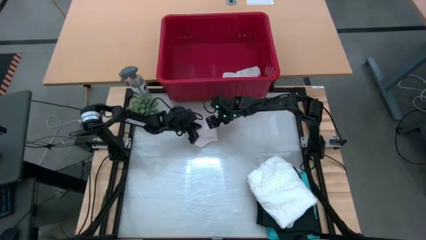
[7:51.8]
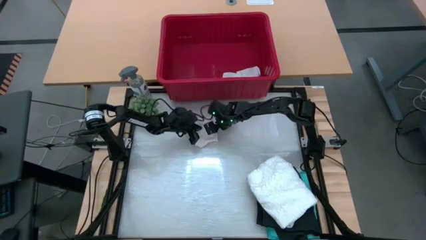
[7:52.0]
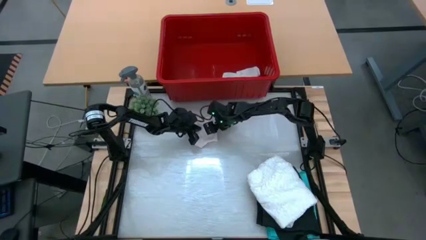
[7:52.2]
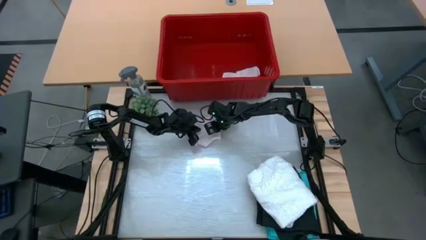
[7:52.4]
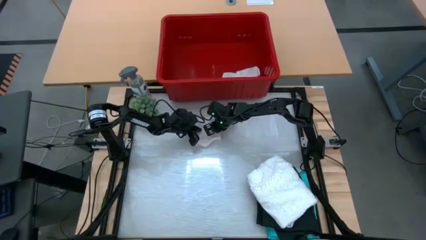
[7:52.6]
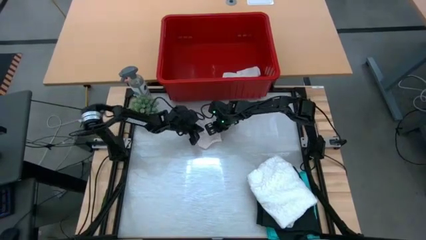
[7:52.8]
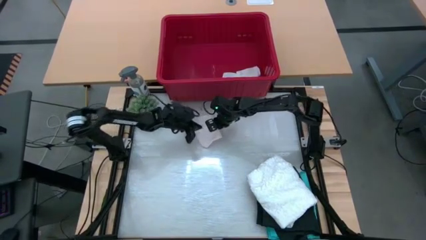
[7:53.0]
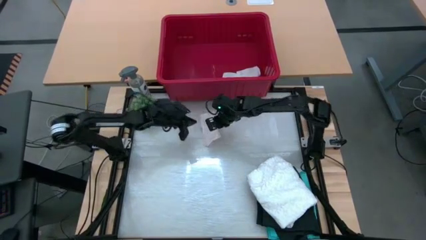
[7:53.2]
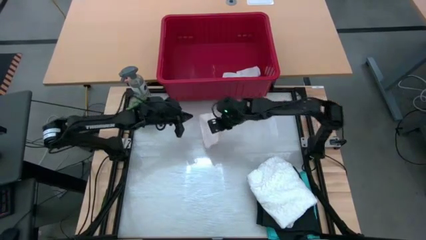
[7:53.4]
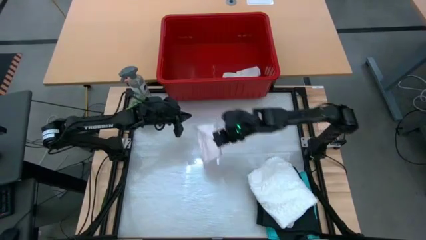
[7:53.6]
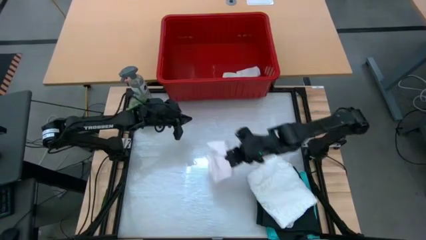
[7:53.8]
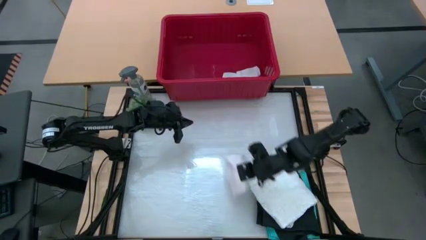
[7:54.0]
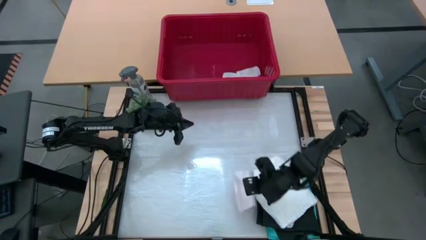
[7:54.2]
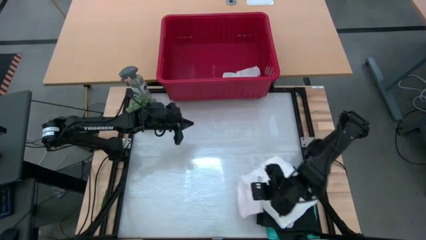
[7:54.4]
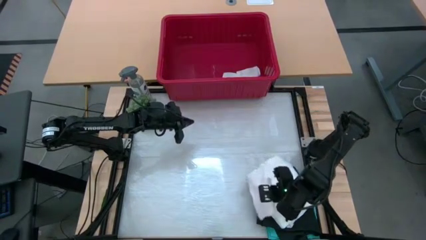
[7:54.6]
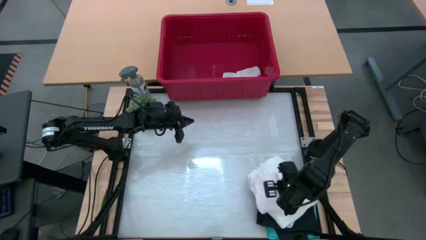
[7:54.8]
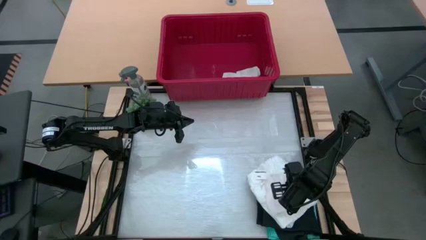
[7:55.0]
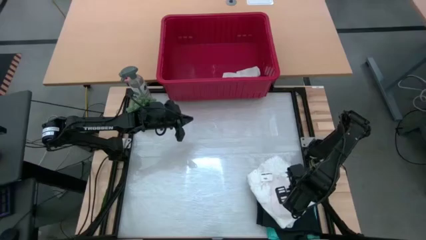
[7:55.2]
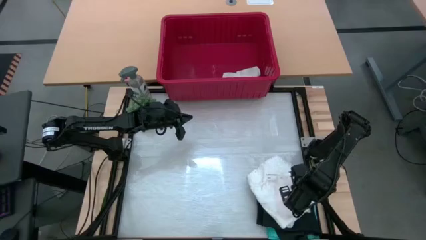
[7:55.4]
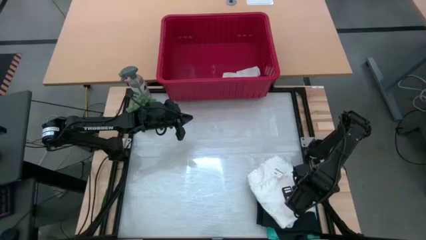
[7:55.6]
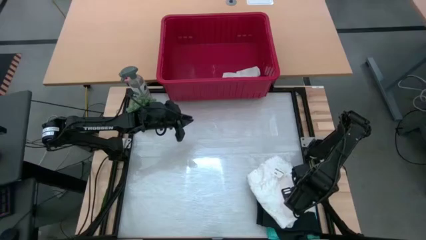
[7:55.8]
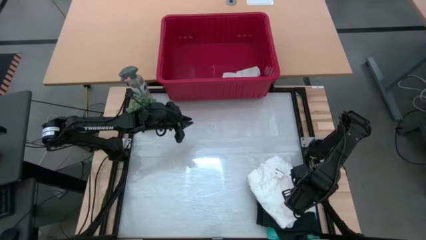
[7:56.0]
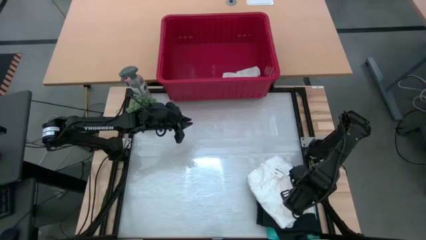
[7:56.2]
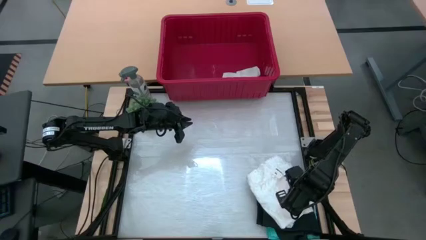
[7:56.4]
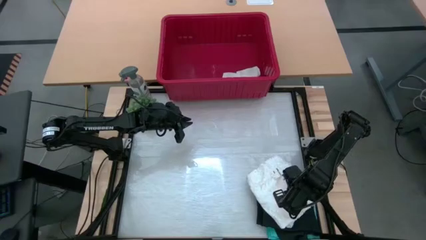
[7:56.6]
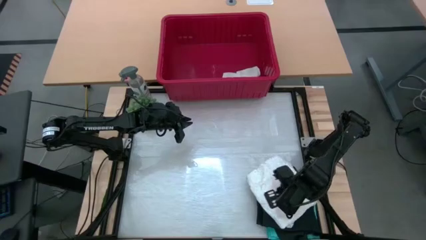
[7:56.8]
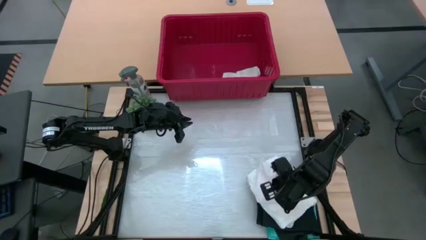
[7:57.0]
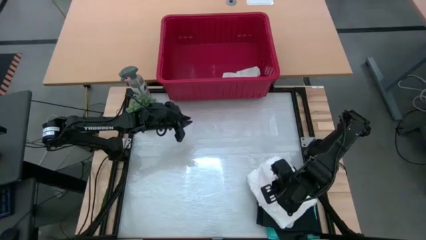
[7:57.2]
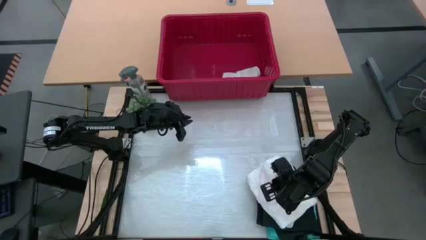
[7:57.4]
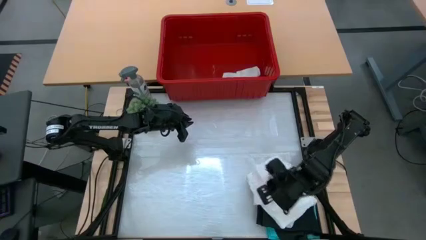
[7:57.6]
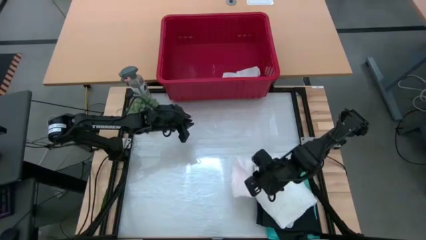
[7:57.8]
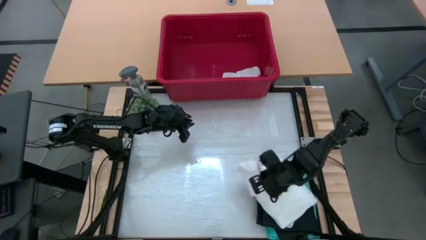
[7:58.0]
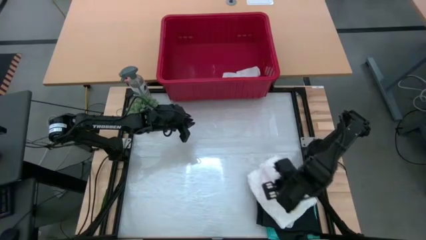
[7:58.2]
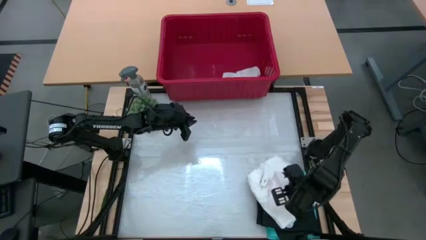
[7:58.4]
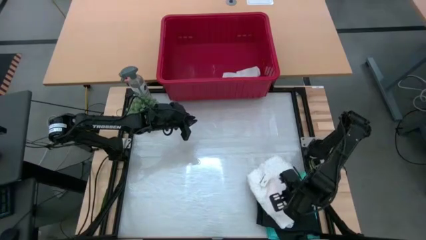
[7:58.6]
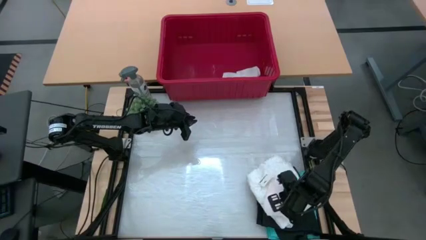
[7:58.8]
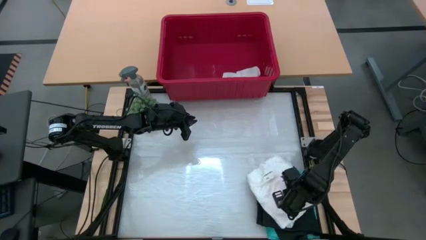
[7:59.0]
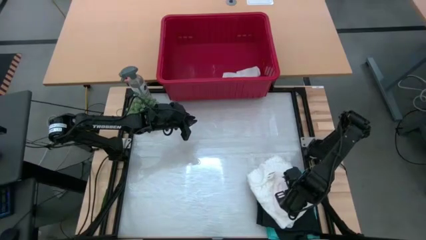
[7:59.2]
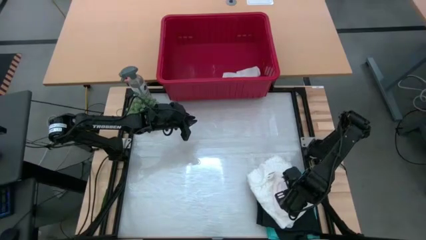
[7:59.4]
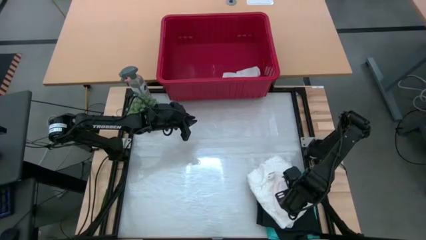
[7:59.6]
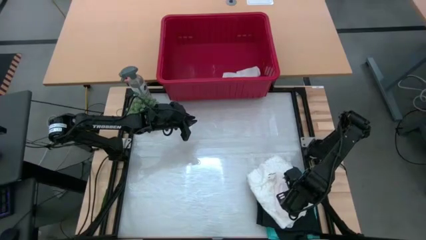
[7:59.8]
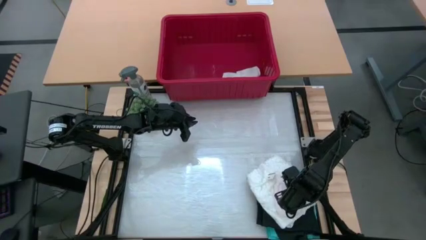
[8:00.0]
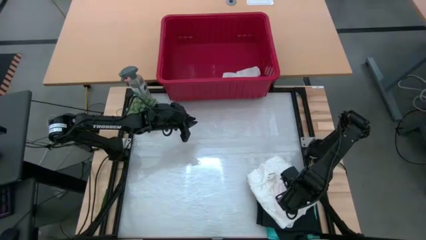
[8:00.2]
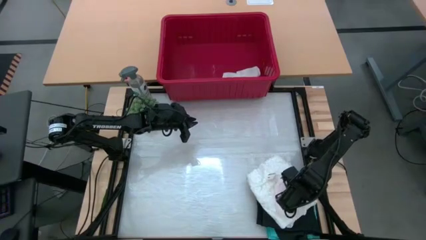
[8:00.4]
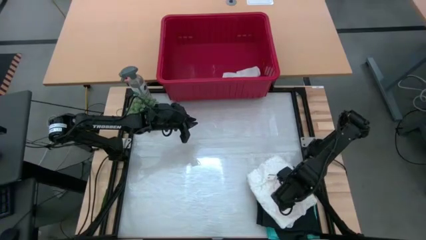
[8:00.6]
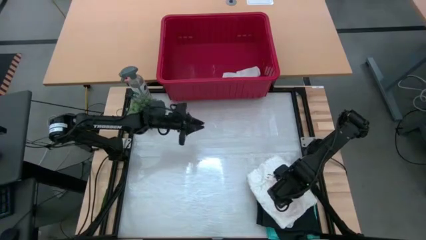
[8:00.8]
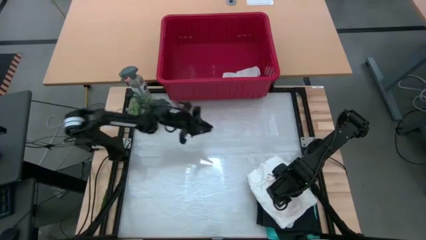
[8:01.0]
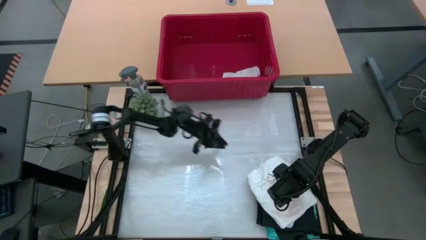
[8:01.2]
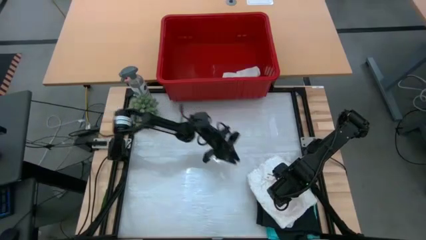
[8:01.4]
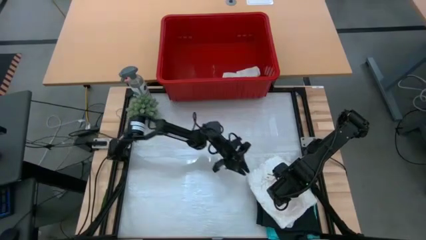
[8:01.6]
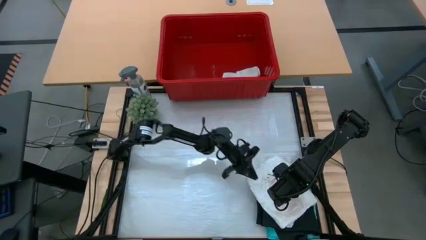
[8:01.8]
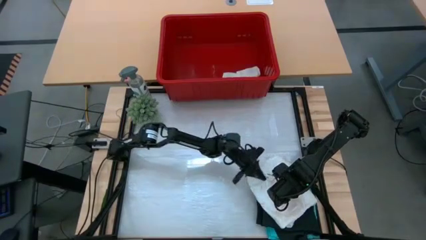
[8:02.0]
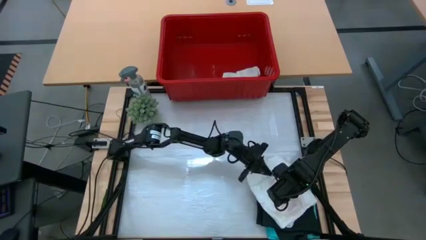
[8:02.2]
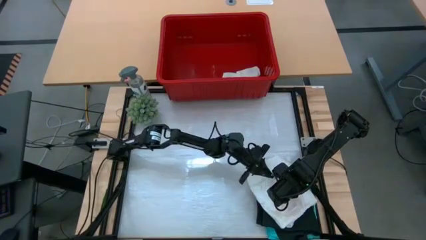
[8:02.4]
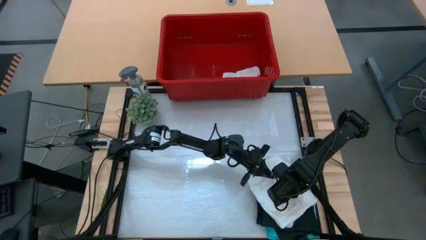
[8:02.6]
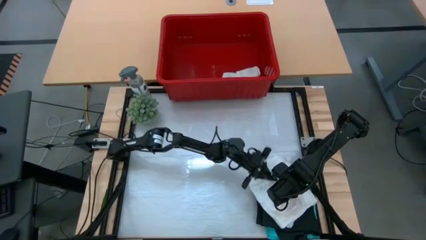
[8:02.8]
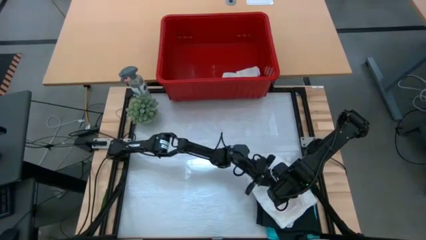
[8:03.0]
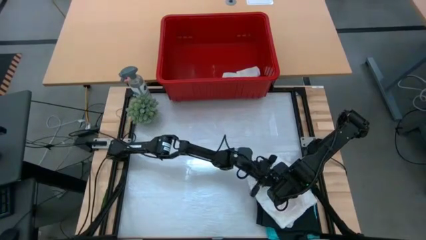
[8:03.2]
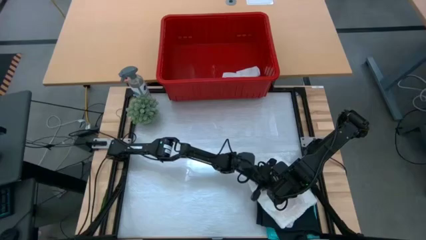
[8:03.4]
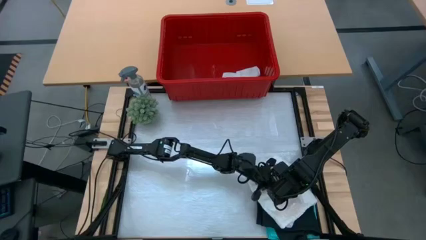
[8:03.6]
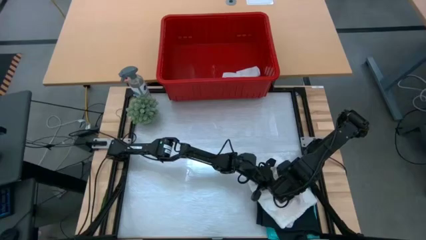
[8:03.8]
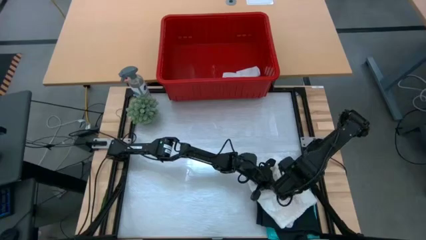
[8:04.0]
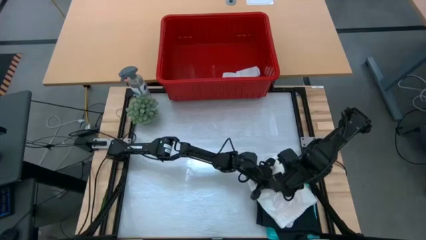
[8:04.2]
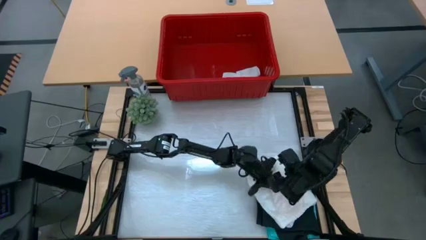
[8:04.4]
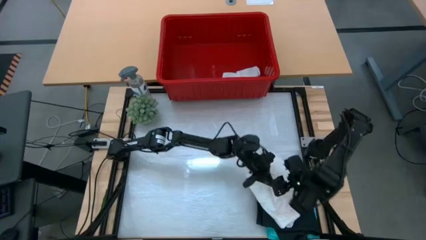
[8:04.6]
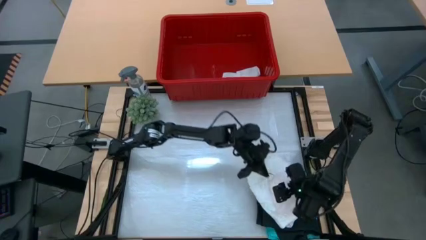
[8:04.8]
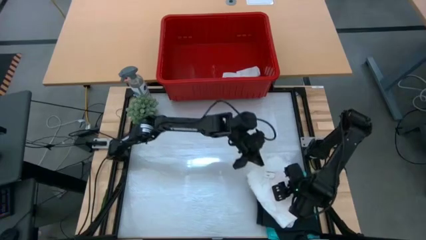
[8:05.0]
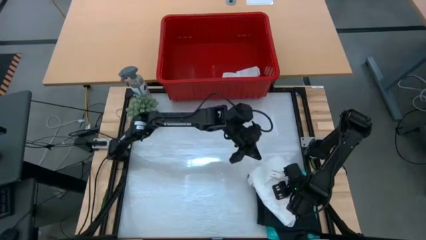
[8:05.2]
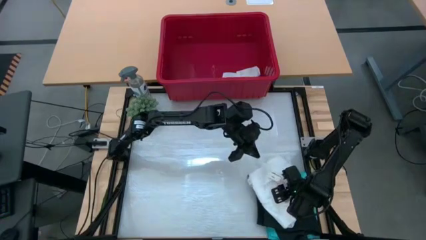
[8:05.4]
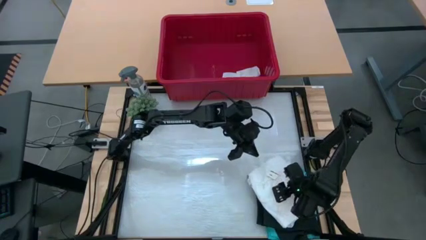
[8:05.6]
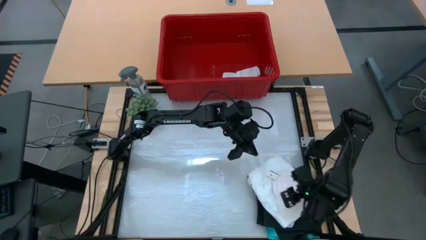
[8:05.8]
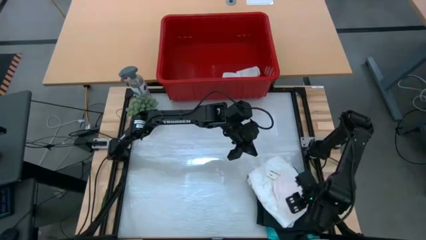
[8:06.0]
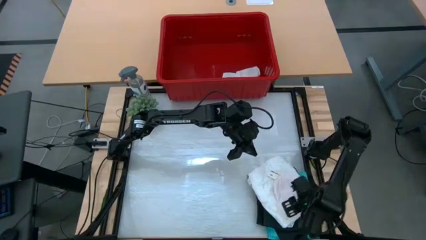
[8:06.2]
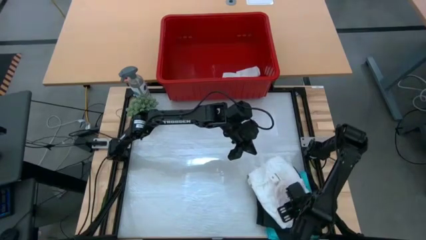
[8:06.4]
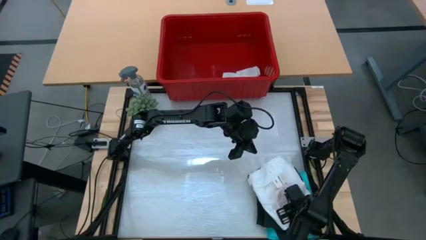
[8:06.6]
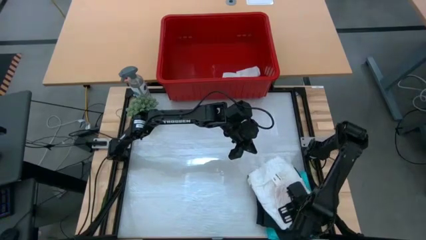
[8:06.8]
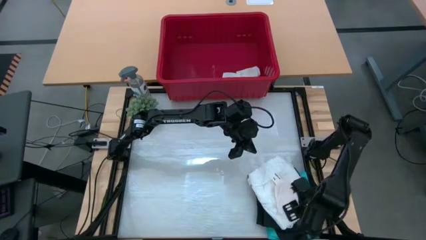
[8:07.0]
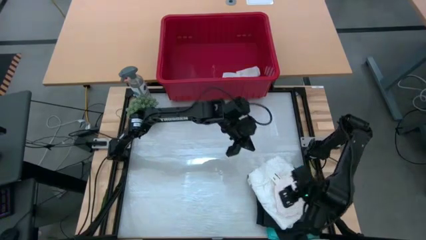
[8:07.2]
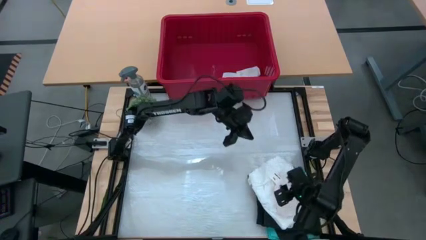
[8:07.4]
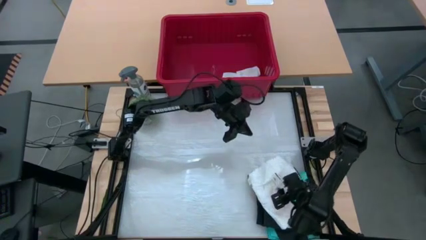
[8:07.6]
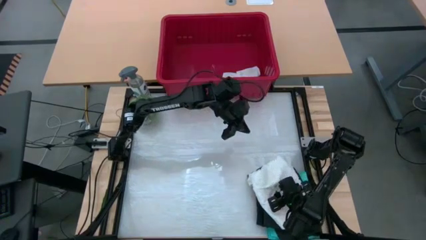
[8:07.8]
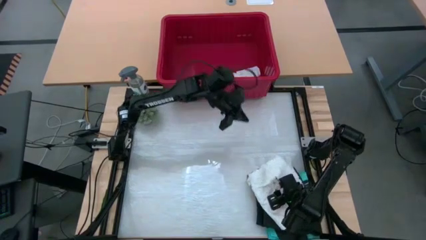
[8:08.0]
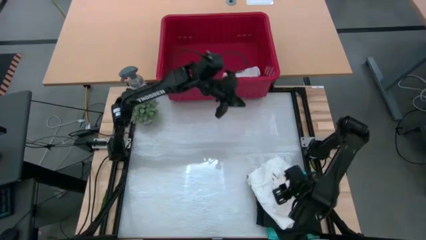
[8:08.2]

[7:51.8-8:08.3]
Task: Fold Laundry from Bin
Stack the white underwear on top of the white t-shirt
